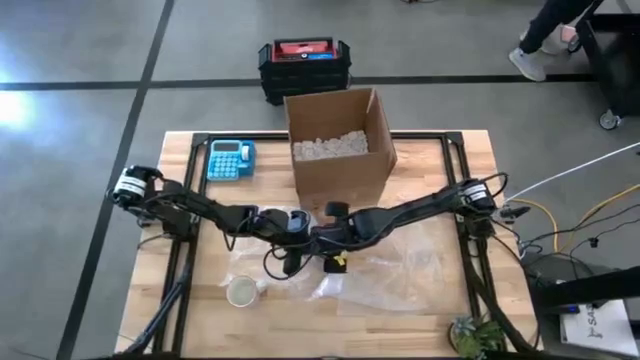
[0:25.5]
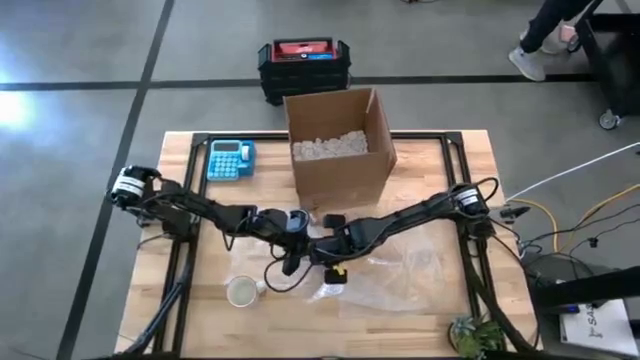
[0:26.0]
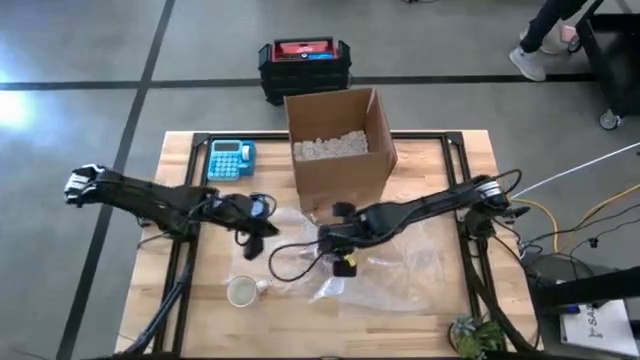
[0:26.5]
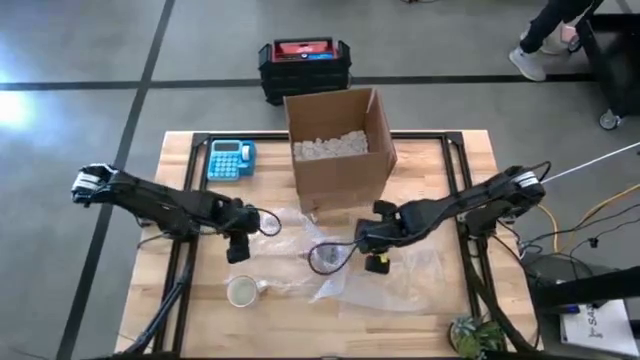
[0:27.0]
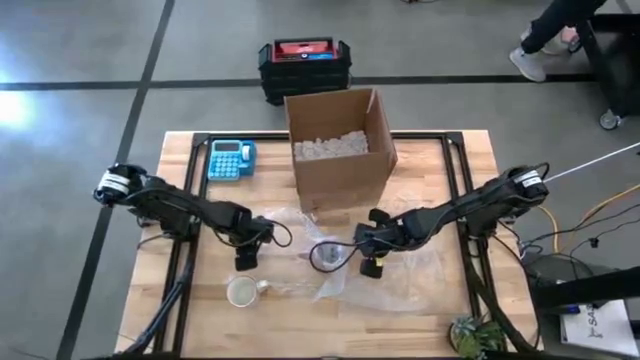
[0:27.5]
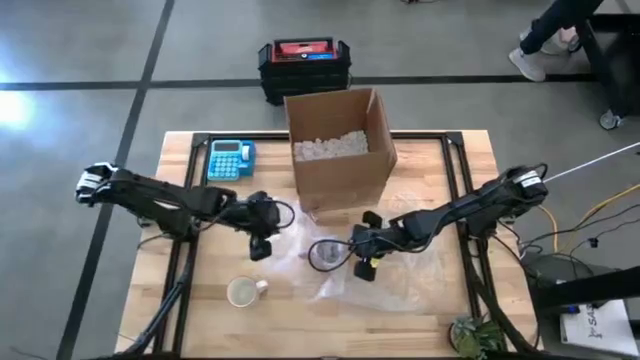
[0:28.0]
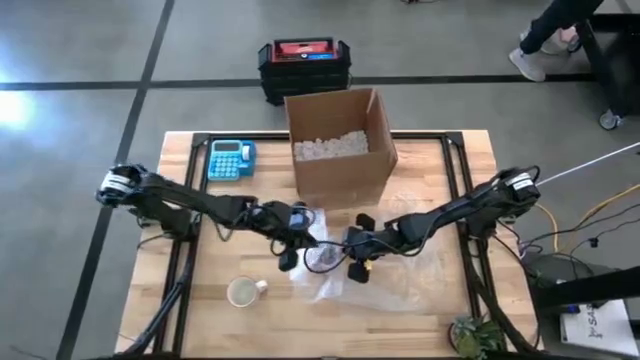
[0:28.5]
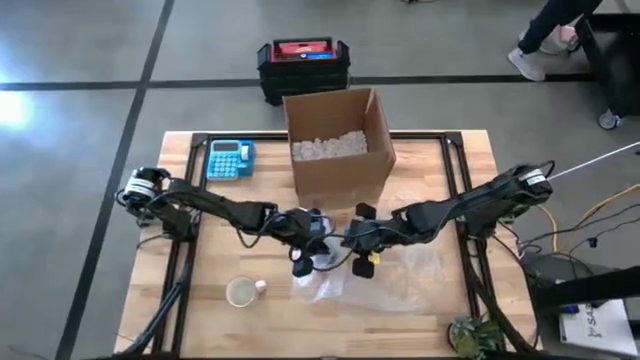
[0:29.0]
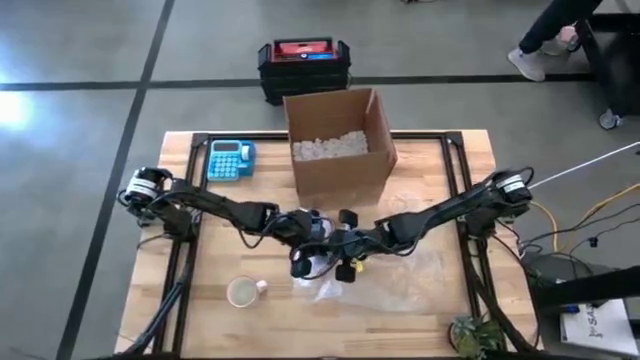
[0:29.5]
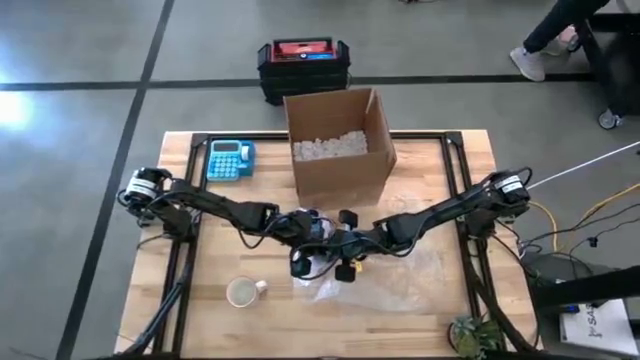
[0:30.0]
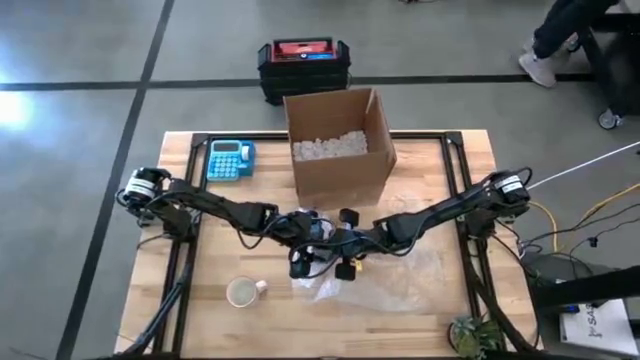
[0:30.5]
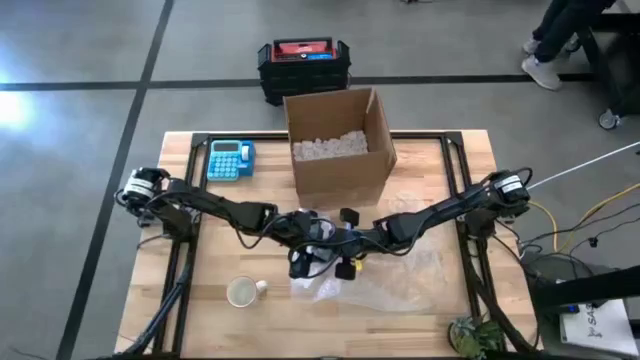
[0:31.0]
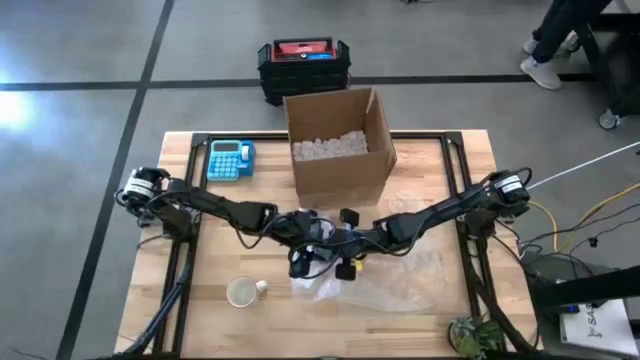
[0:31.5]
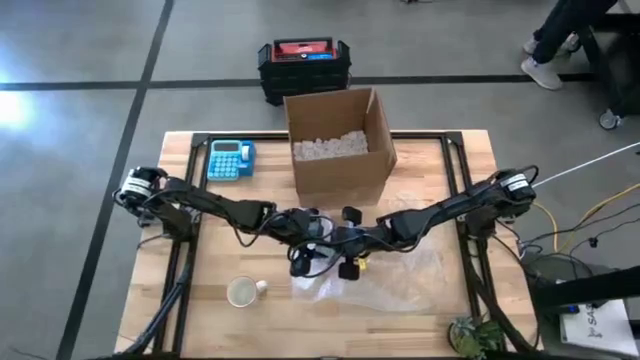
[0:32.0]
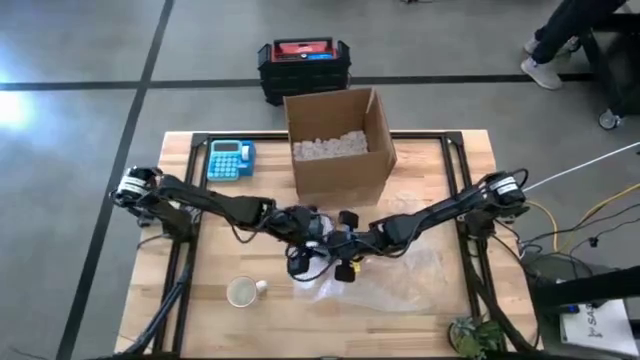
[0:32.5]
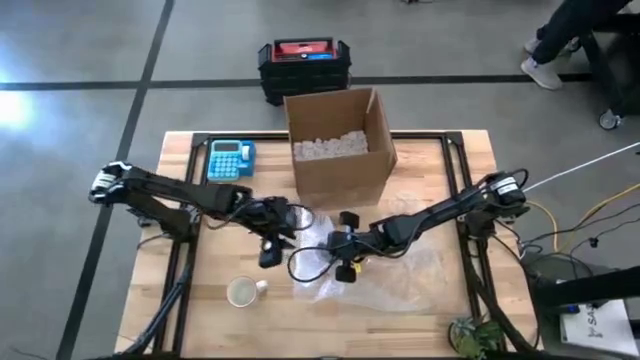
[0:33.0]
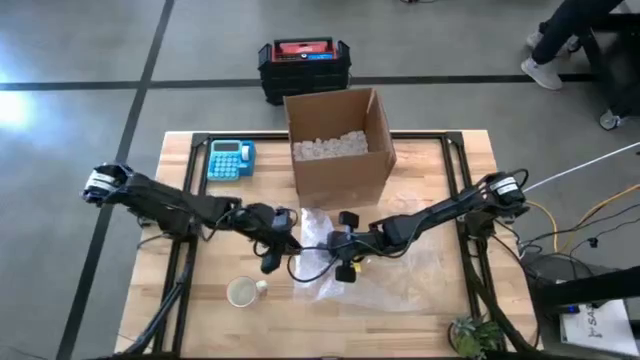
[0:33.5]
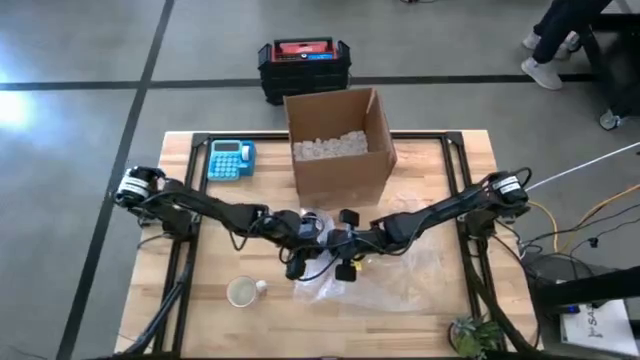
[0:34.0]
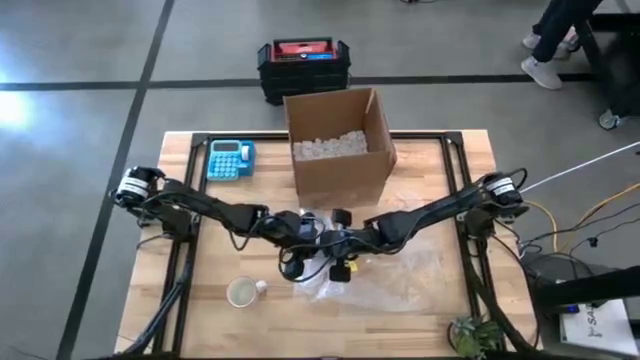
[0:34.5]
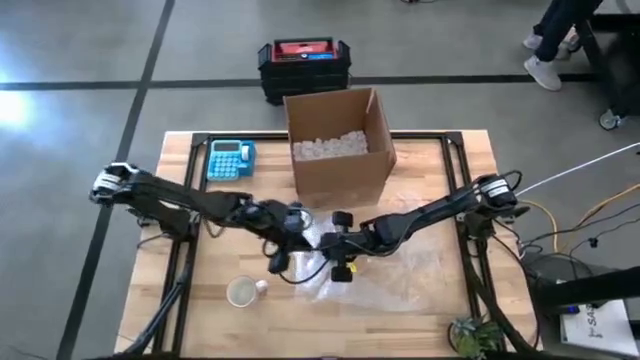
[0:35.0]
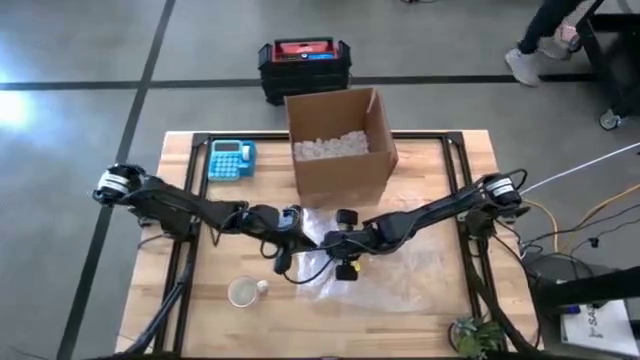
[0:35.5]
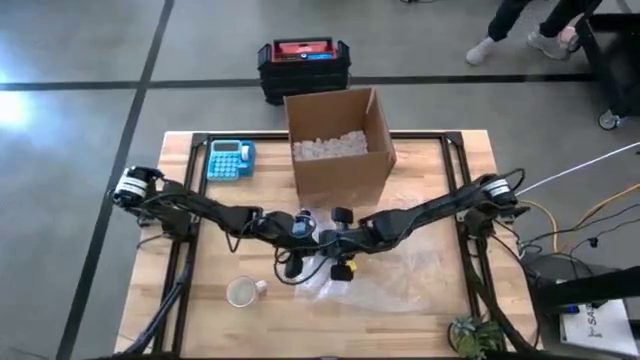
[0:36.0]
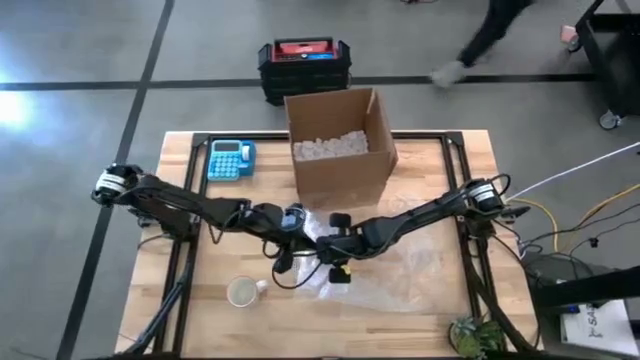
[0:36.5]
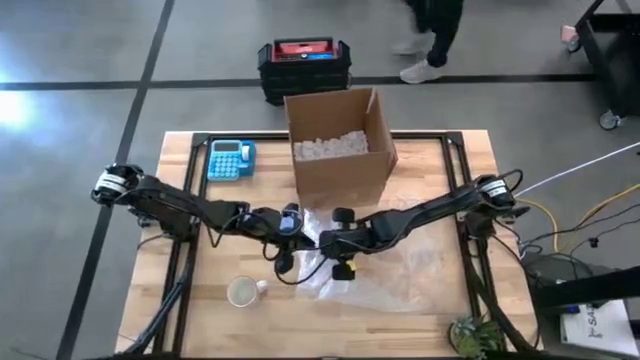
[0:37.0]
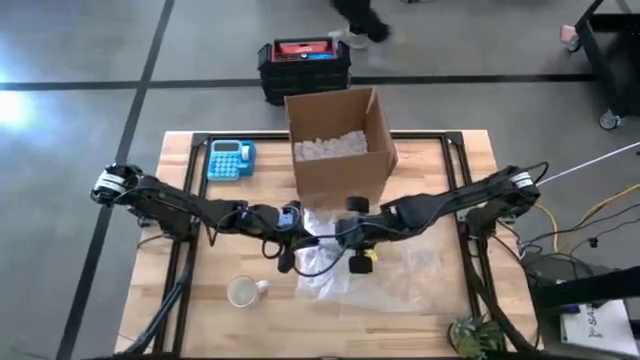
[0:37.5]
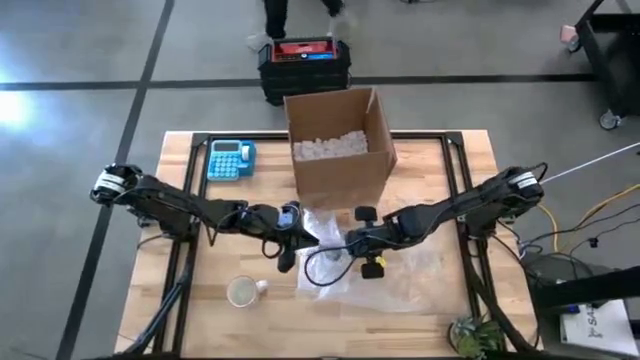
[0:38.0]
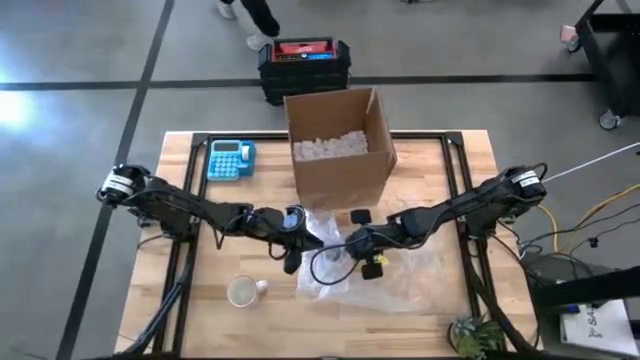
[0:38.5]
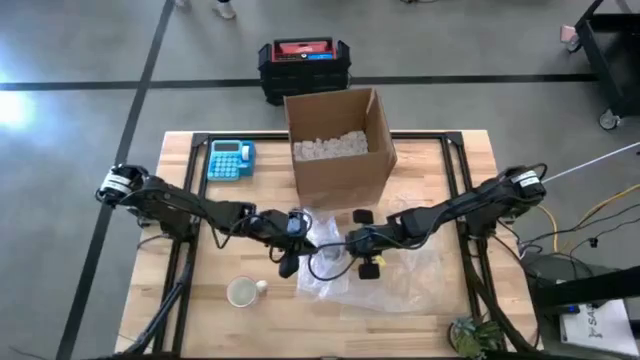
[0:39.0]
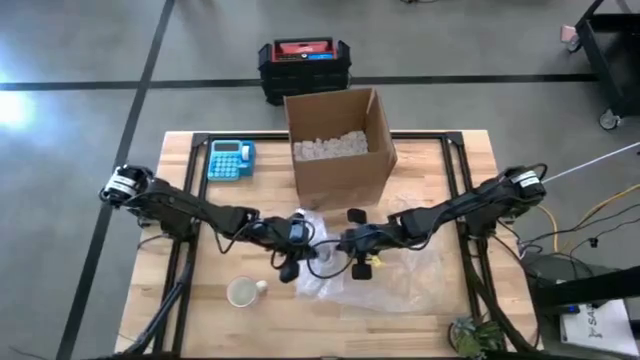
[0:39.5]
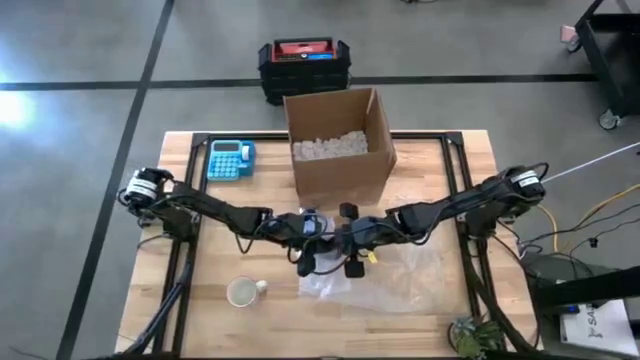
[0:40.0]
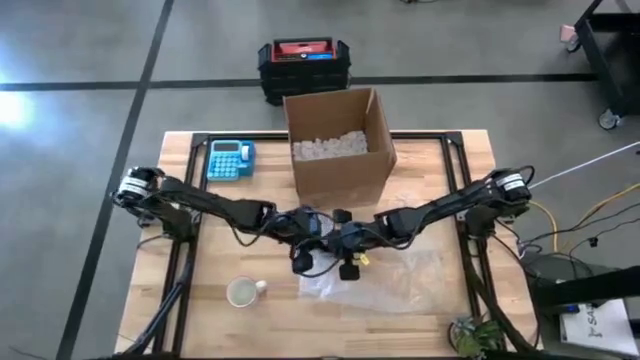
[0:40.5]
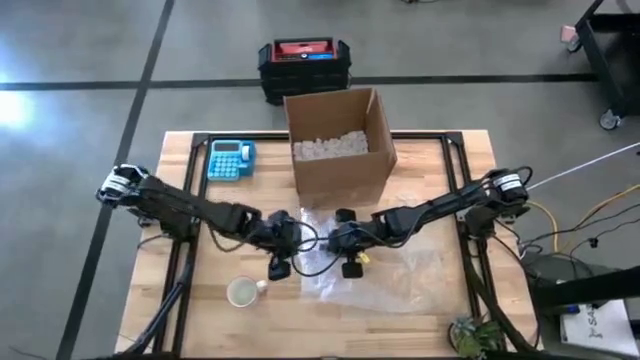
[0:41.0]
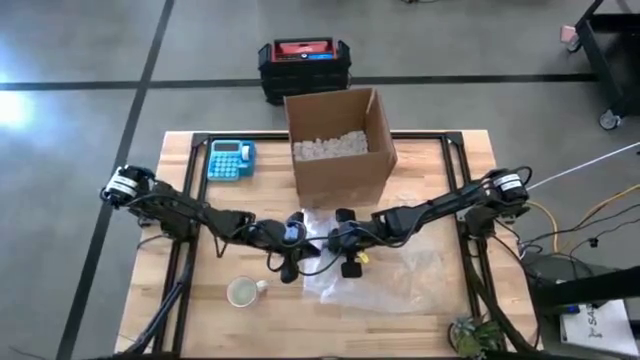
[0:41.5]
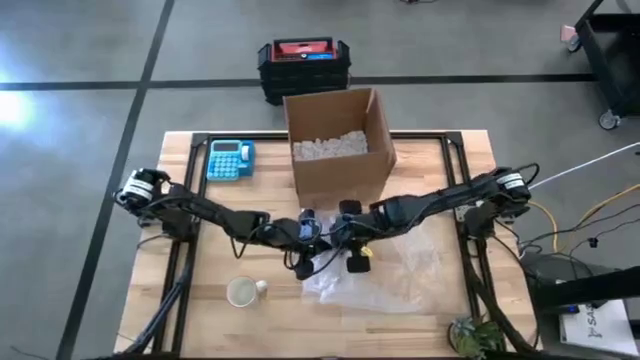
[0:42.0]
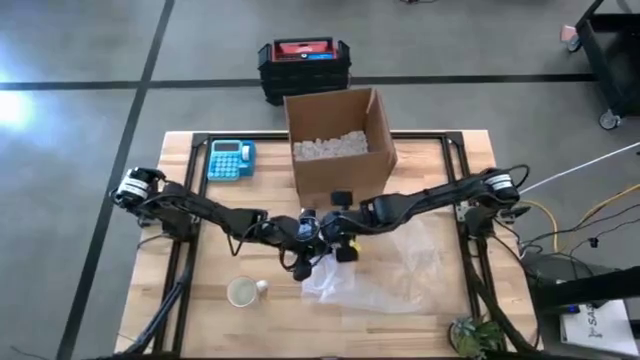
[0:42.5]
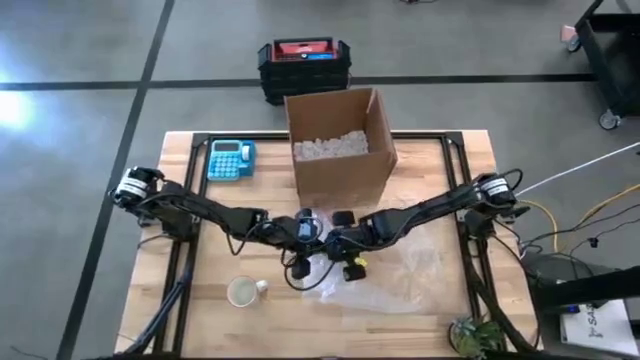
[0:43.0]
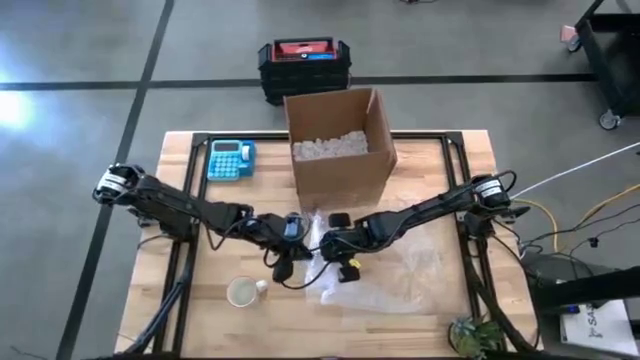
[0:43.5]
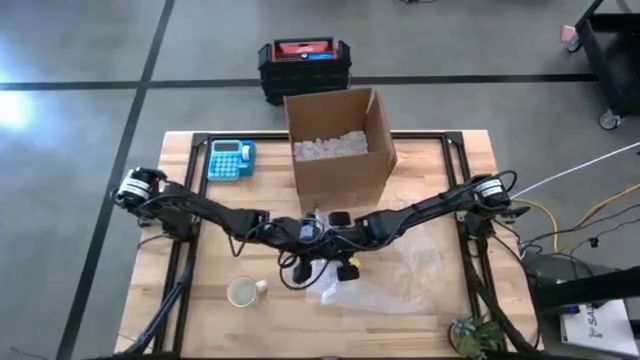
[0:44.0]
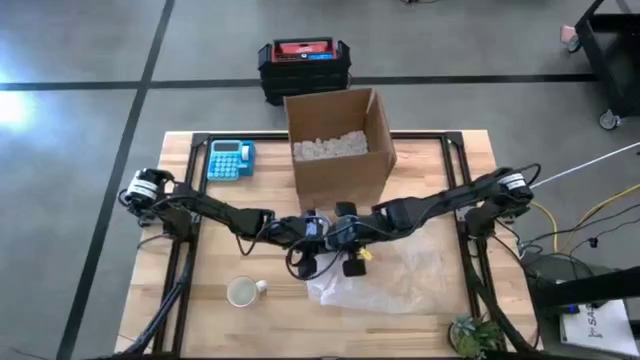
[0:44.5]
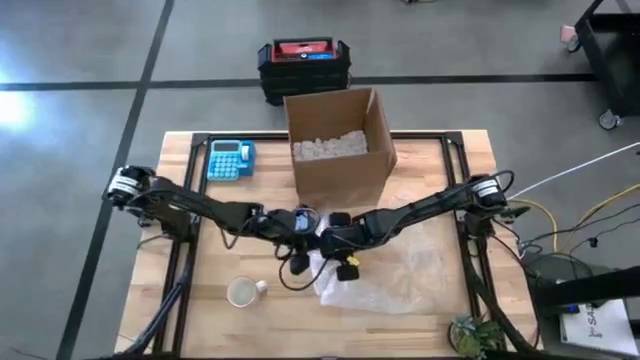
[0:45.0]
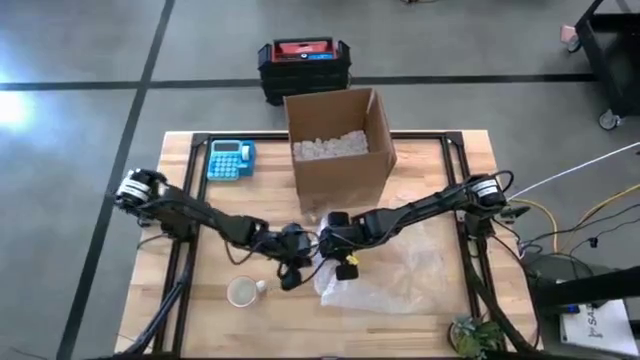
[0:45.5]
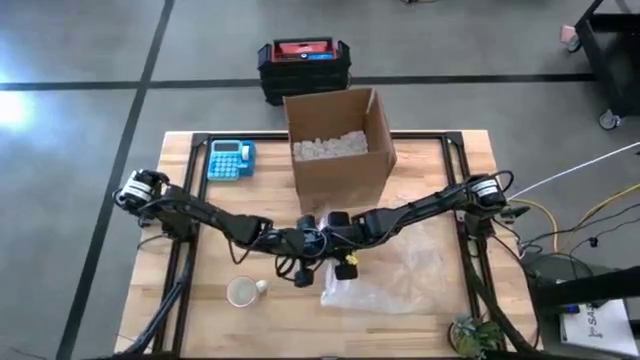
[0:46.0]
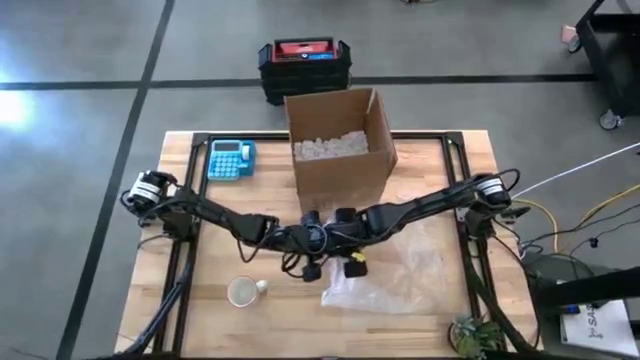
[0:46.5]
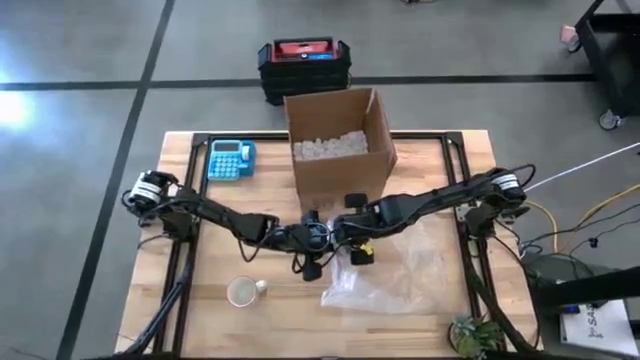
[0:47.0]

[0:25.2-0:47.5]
Task: wrap mug
Wrap the purple mug with bubble wrap
